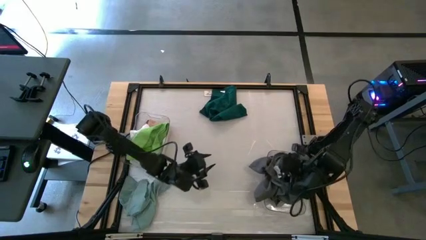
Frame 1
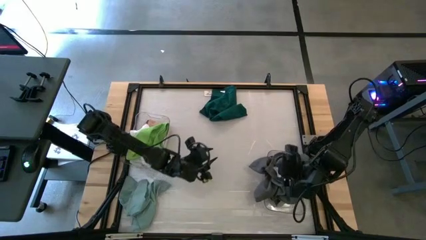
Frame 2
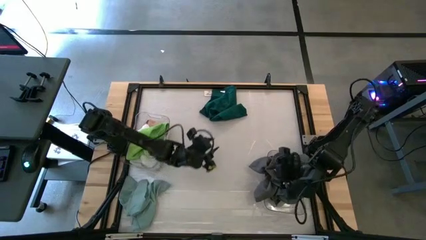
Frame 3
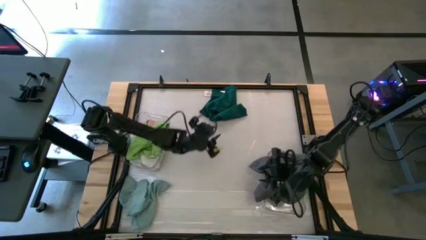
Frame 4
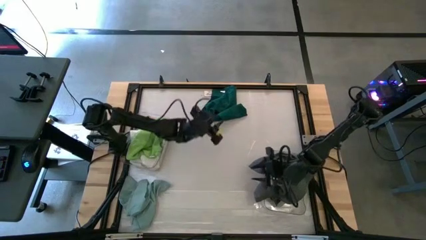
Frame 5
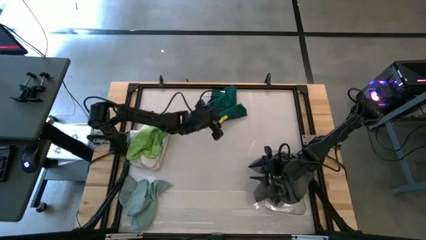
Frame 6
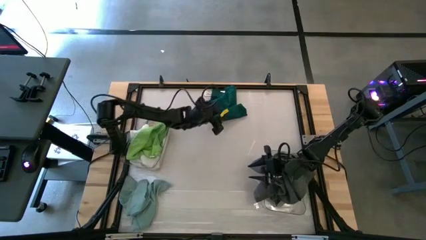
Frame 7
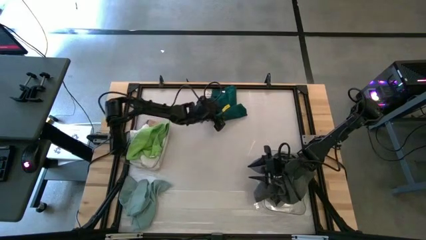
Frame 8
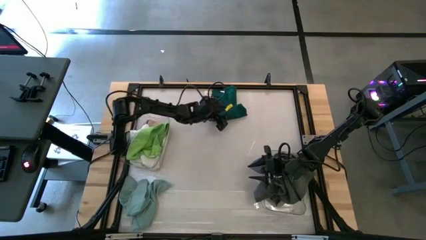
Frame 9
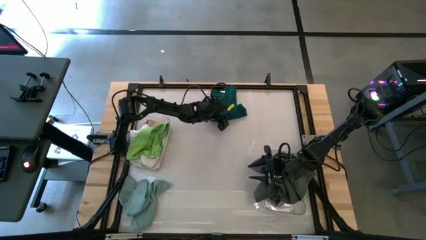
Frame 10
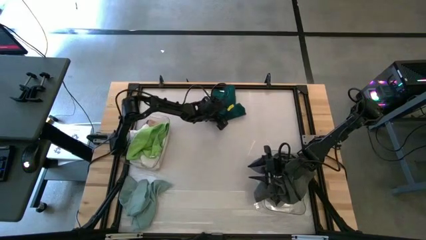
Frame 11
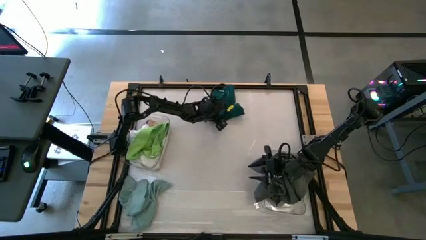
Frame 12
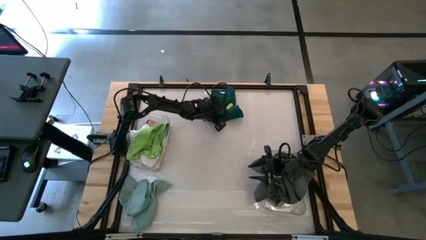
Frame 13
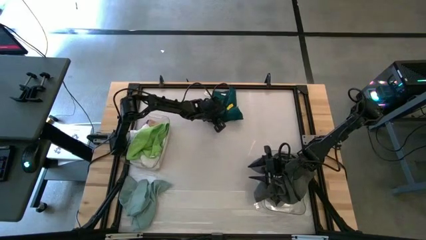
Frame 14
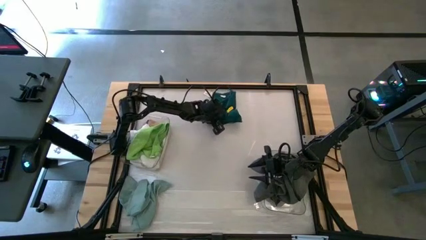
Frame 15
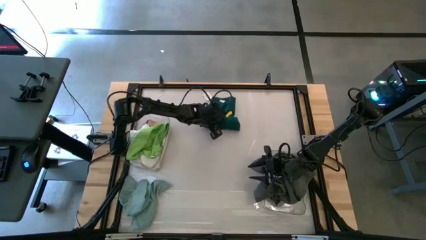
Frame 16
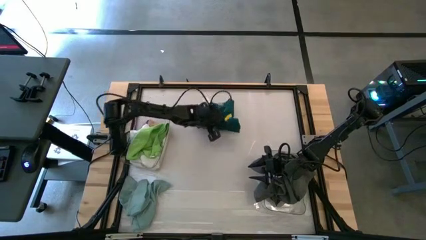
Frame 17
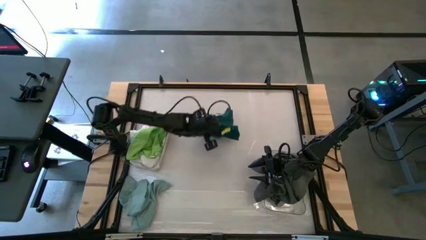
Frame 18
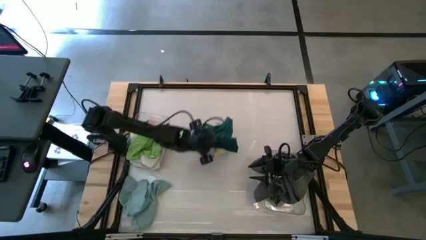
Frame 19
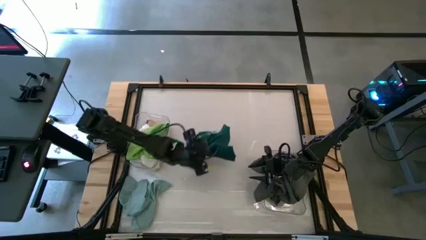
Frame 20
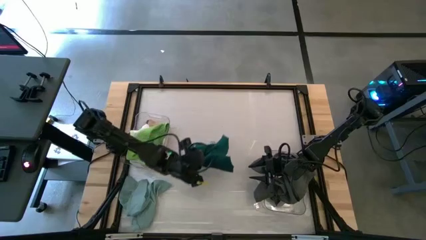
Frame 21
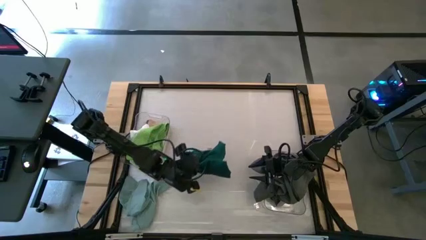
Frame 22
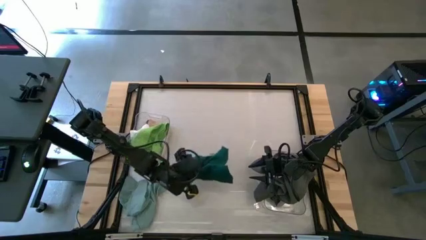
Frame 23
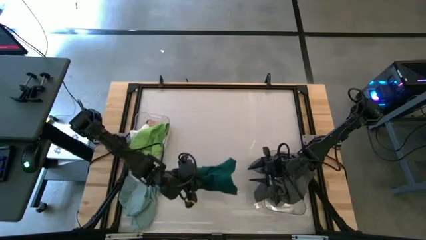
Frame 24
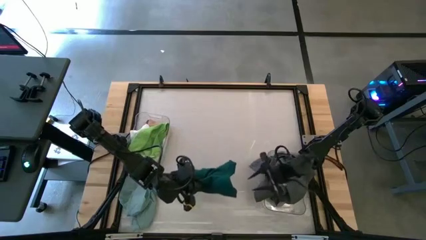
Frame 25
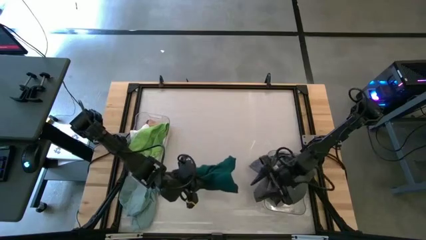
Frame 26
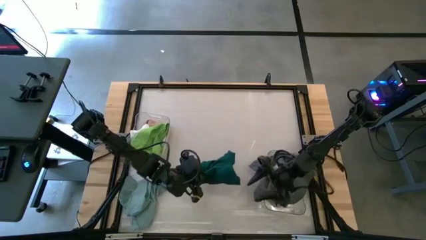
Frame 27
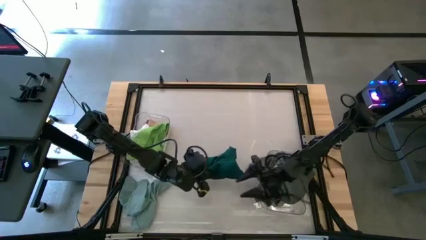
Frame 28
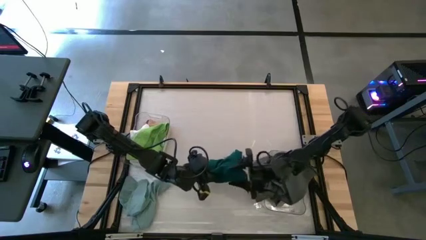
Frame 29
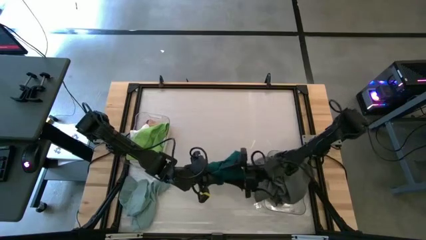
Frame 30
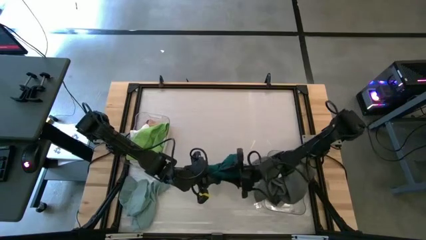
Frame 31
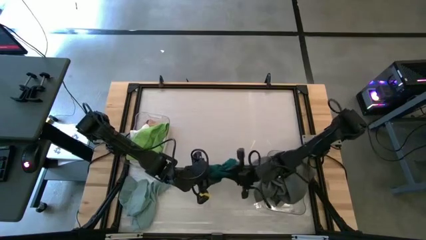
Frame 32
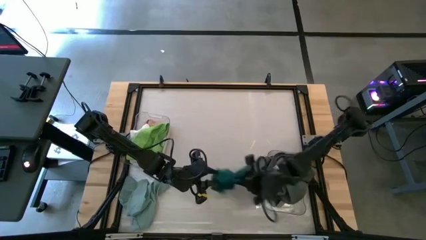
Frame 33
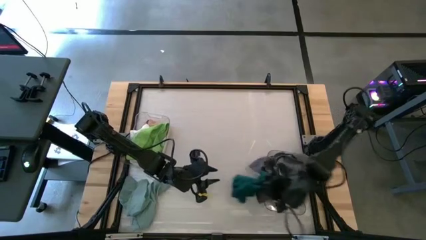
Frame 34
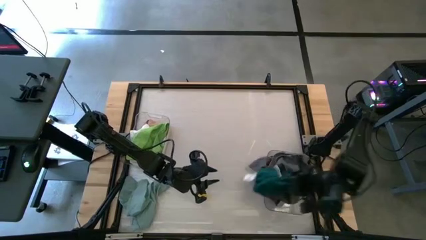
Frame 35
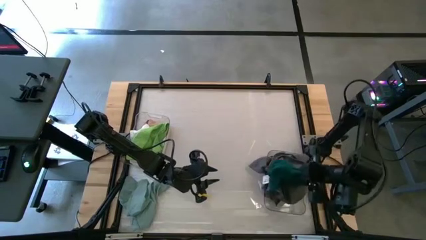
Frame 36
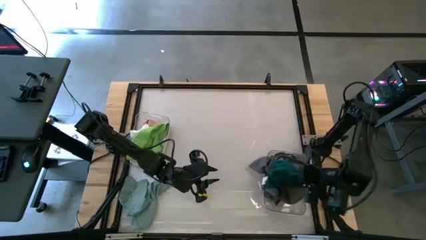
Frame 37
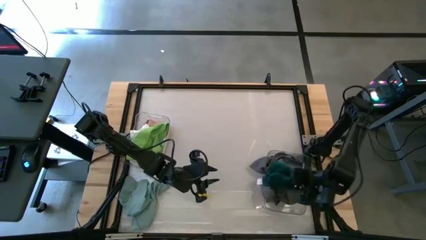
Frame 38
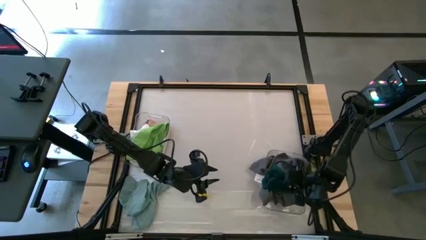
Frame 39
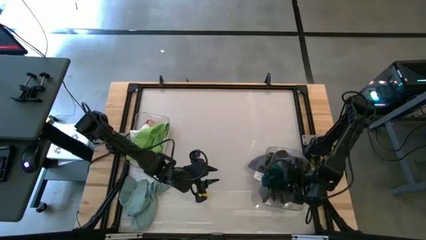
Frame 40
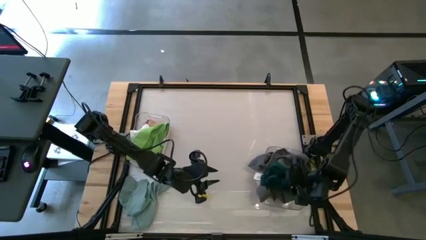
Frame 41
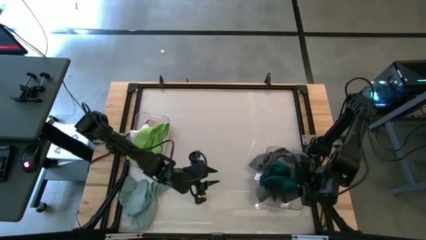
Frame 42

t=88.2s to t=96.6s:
Task: Sort towels by color in basket
Put the dark green towel into the right transparent bin

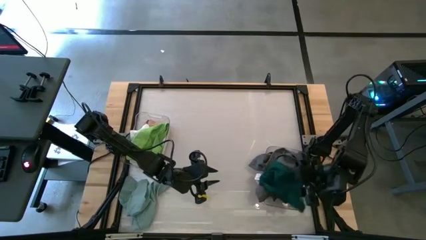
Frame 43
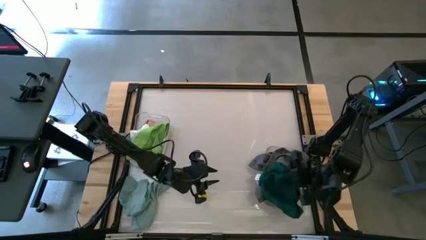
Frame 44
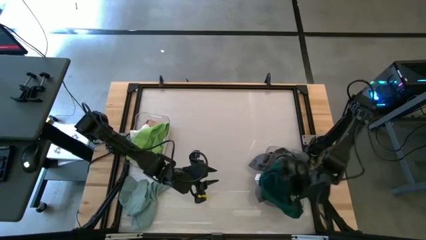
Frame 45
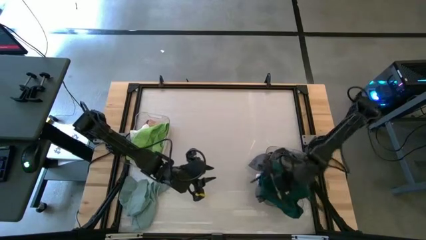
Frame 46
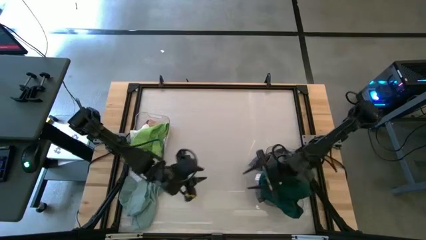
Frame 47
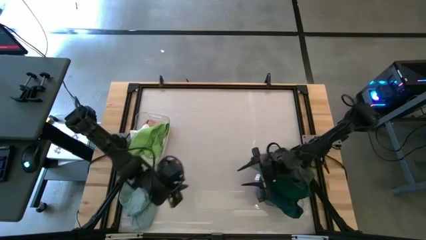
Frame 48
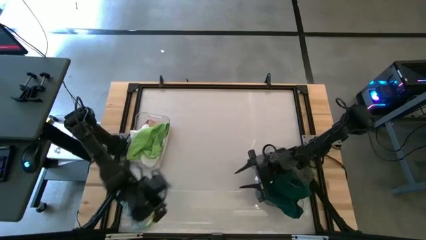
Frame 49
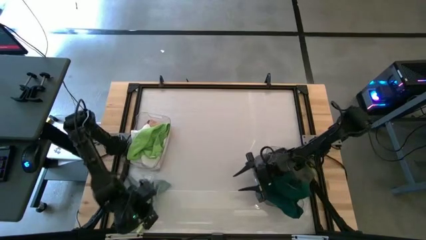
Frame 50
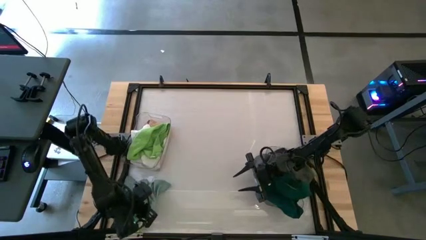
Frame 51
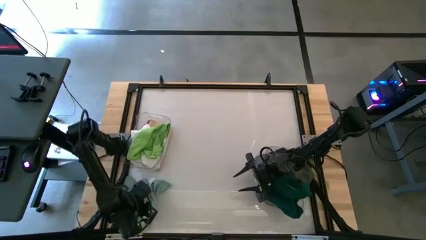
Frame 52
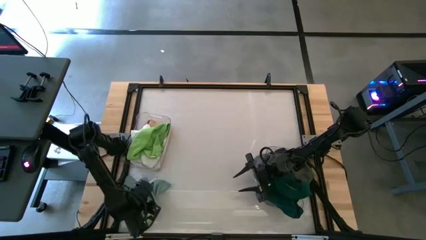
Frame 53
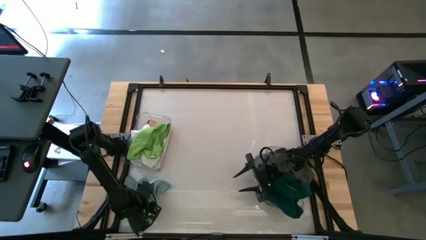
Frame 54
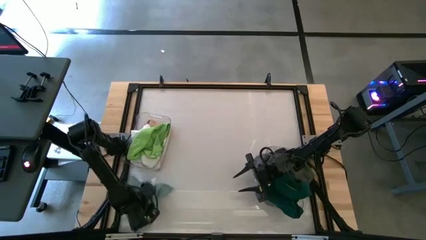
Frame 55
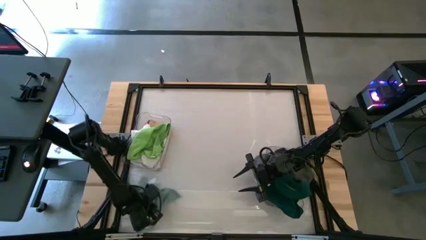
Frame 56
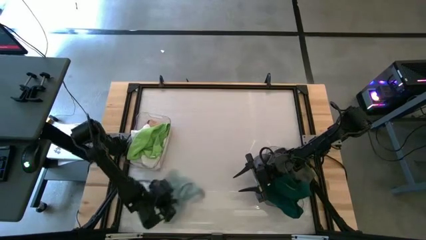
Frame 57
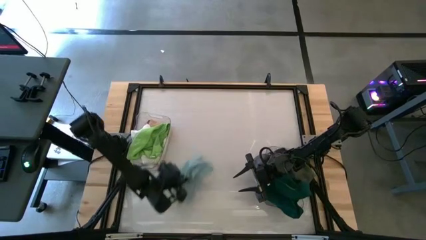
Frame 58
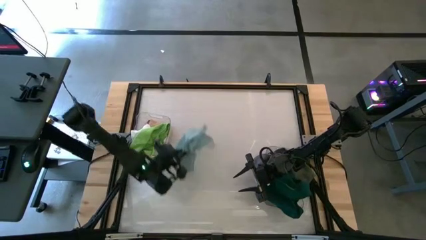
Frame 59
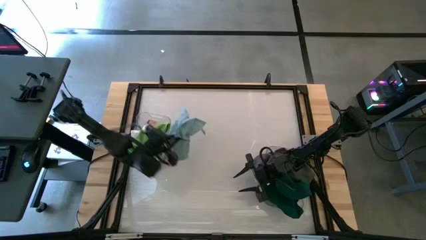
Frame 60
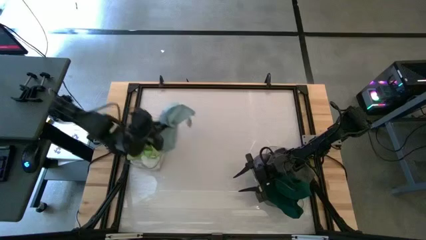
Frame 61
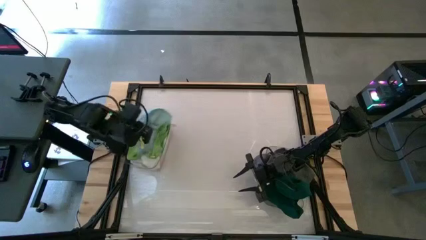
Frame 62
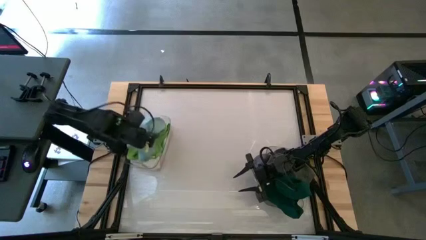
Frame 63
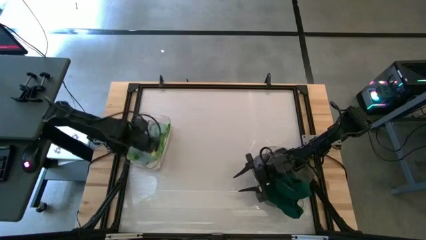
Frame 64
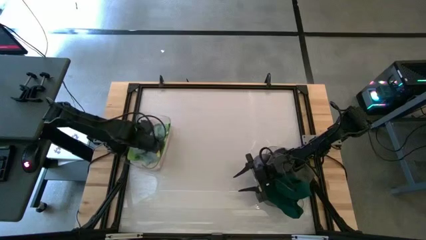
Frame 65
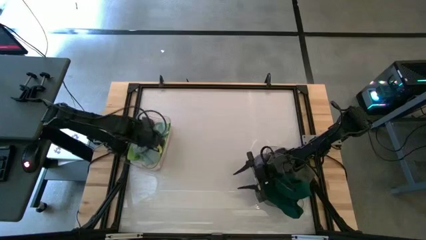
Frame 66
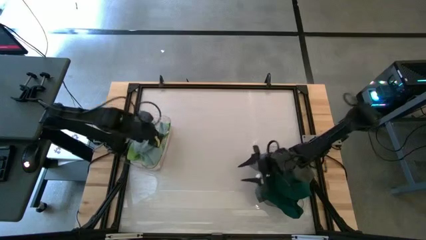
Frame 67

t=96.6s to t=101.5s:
Put the light blue towel into the left transparent bin
